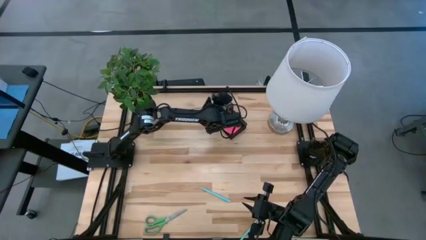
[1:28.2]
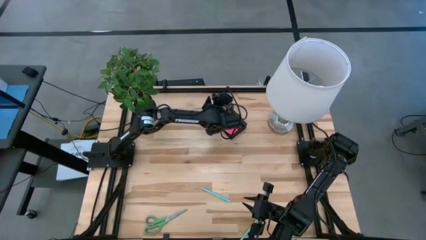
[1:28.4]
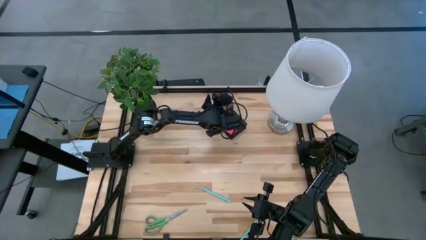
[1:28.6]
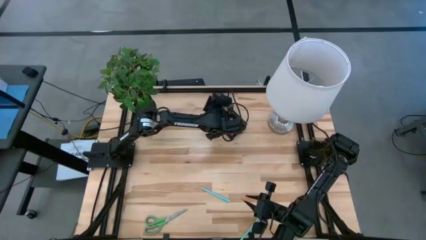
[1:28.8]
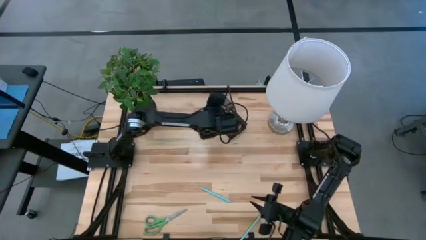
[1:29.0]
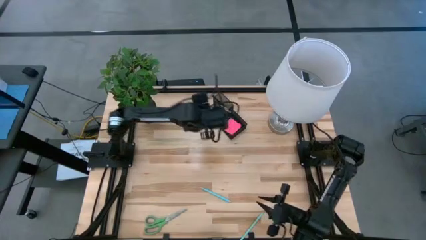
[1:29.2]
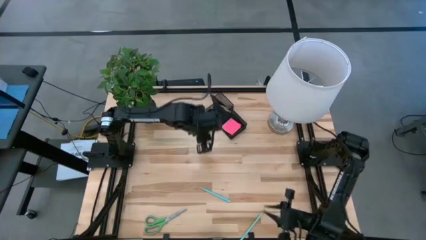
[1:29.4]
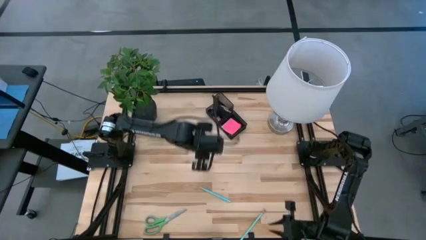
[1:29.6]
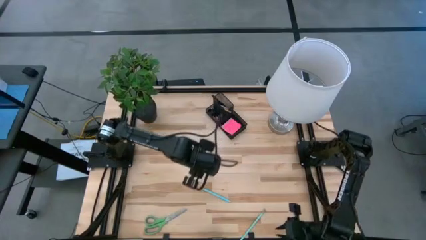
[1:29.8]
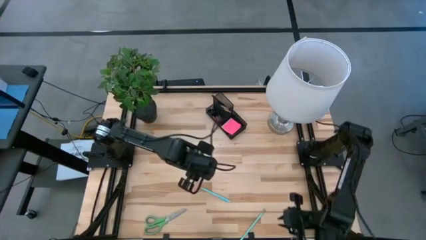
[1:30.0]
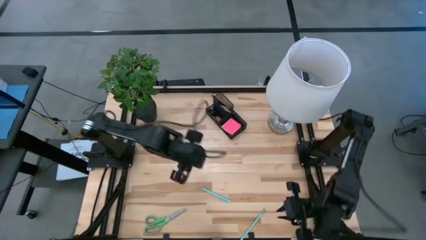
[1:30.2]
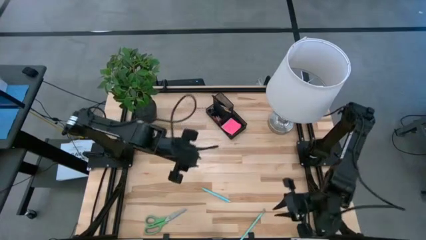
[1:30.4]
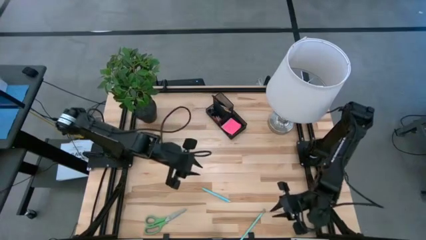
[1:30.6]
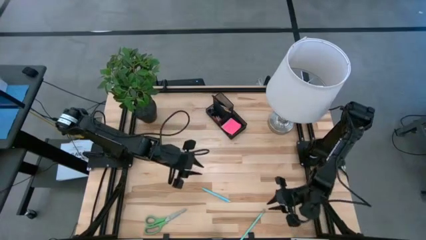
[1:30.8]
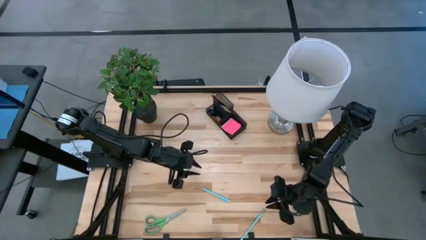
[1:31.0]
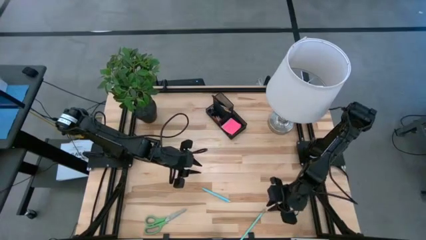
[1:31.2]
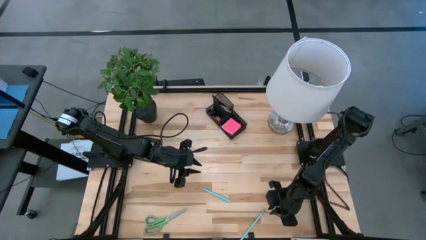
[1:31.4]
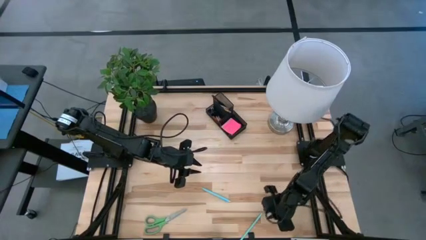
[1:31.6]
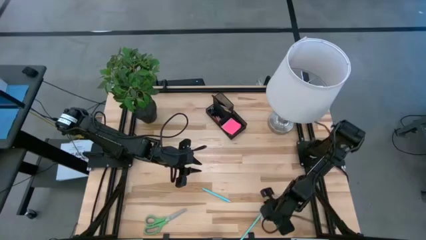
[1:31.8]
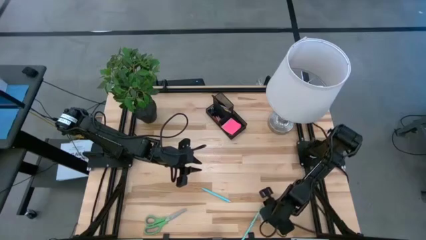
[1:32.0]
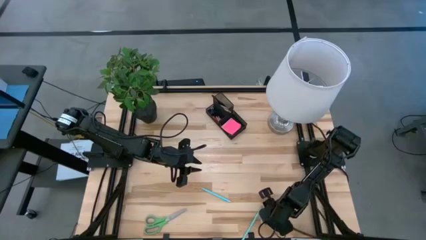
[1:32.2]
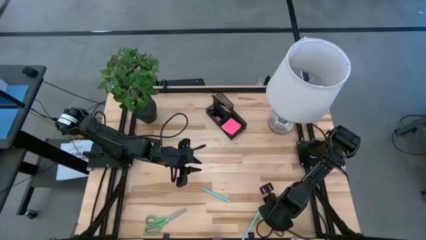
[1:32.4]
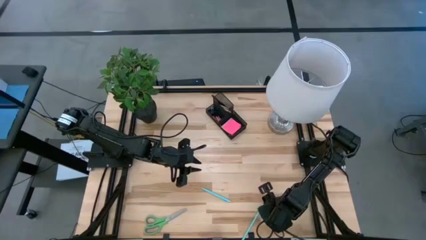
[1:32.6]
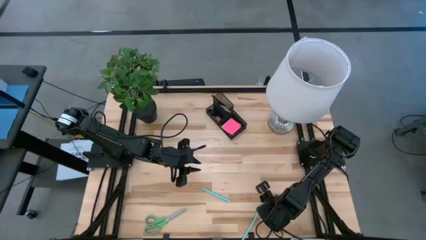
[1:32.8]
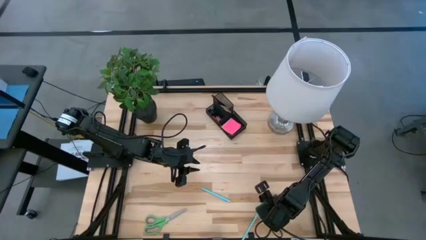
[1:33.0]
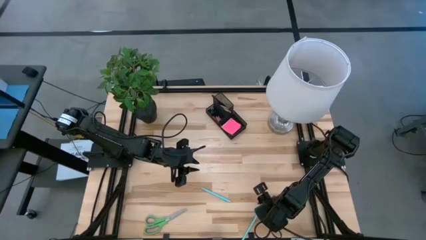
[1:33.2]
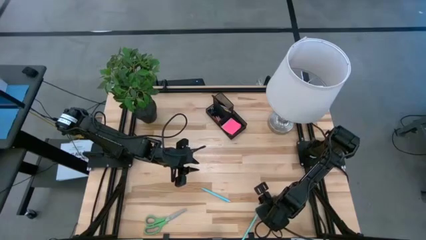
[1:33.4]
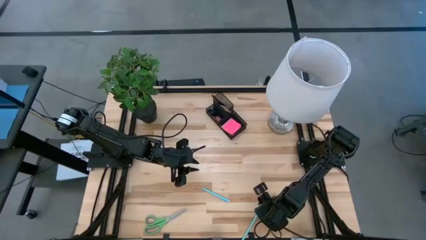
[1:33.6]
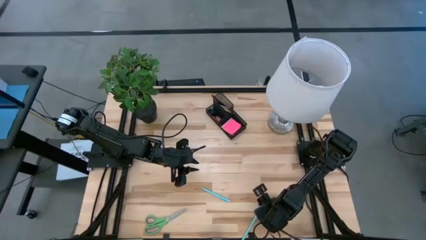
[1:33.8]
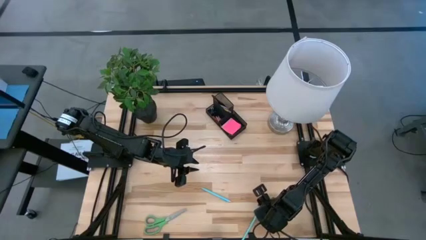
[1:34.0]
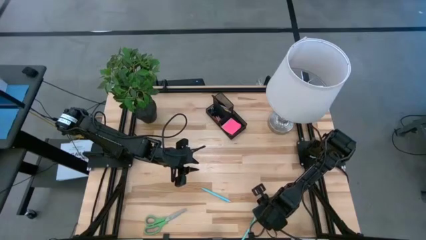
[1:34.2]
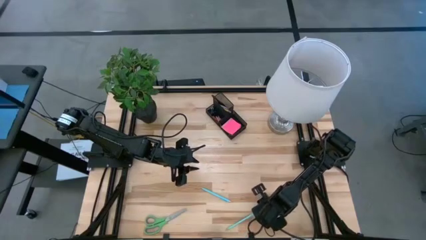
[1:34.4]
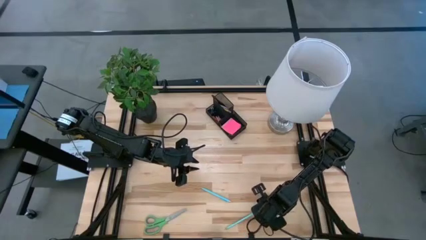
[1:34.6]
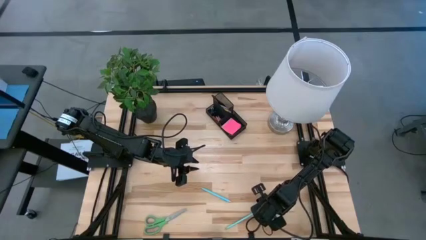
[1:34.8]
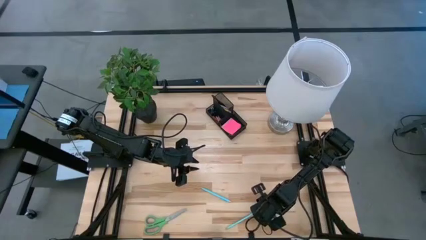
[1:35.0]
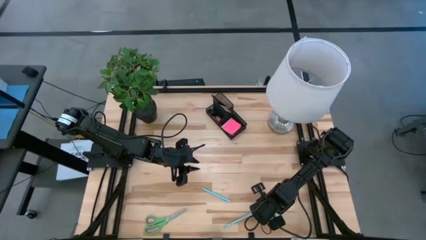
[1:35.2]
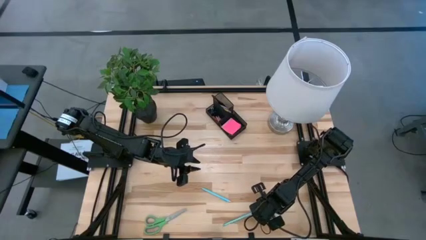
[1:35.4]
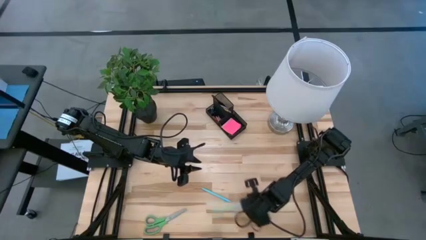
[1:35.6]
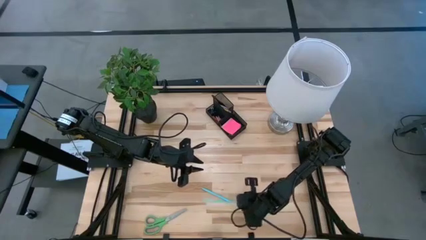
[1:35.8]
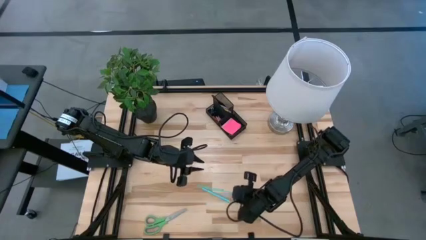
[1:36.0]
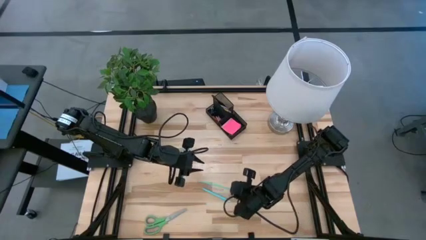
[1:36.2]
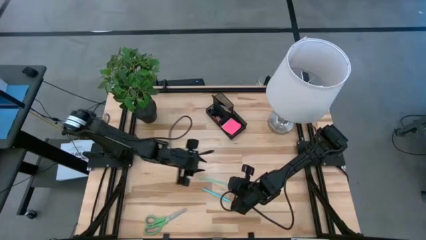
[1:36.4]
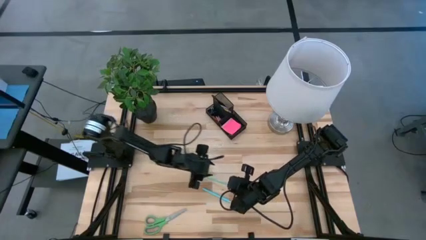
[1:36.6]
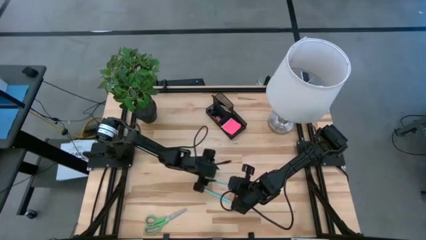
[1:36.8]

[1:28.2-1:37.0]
Task: Pick and place office supplies into organizer
Put the blue pencil into the desk organizer

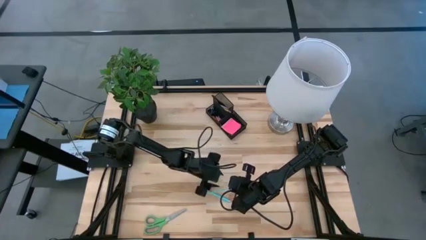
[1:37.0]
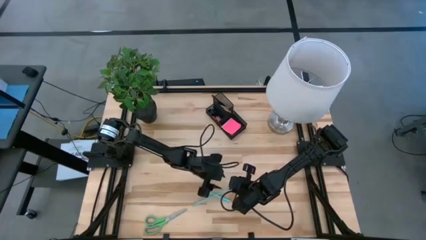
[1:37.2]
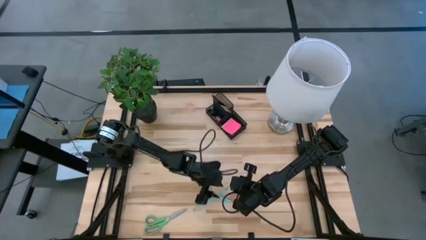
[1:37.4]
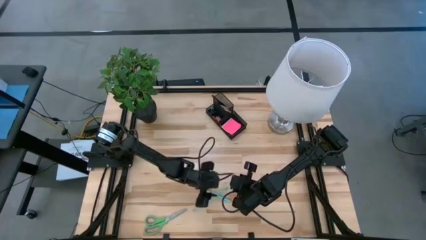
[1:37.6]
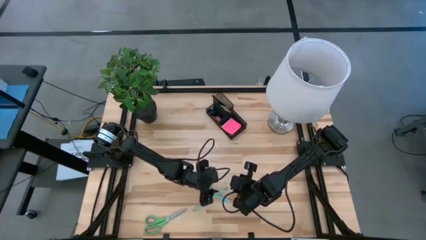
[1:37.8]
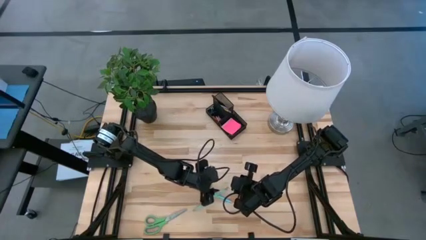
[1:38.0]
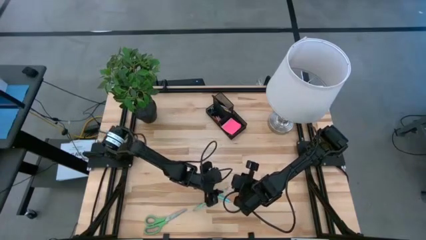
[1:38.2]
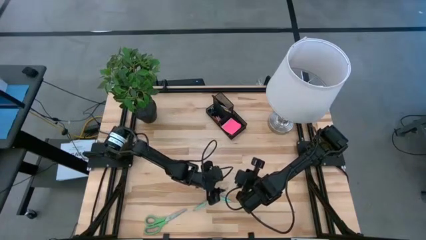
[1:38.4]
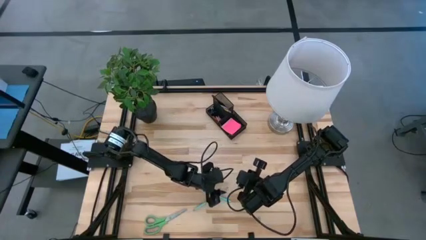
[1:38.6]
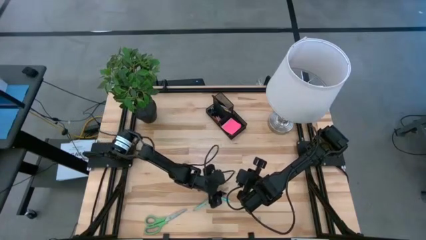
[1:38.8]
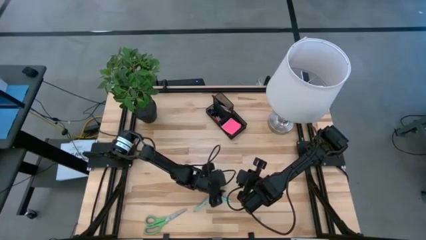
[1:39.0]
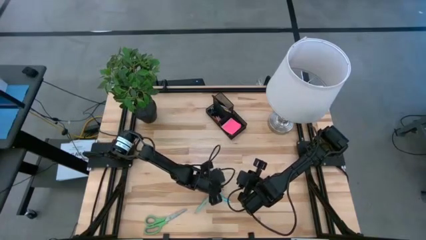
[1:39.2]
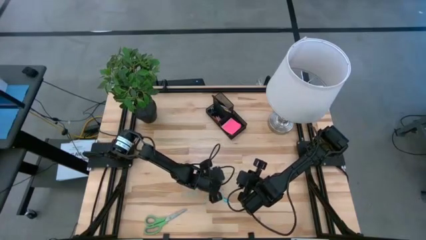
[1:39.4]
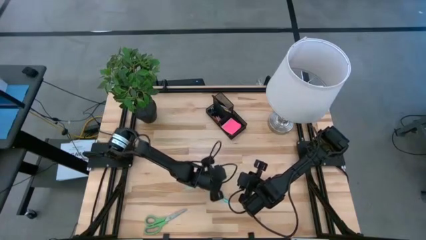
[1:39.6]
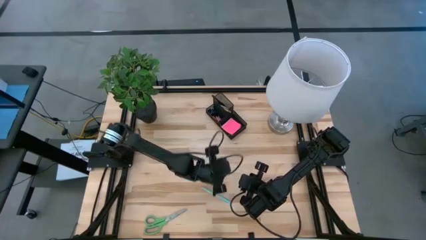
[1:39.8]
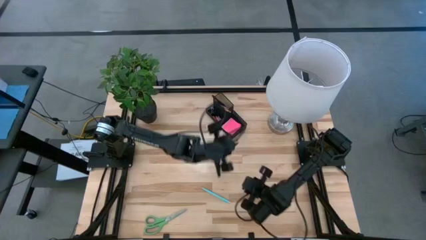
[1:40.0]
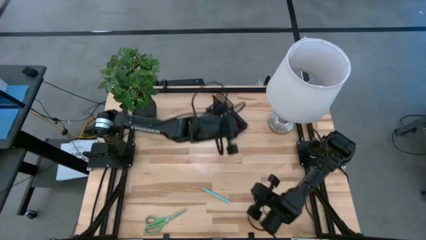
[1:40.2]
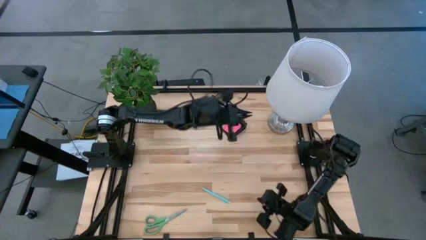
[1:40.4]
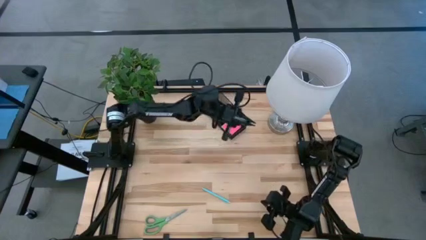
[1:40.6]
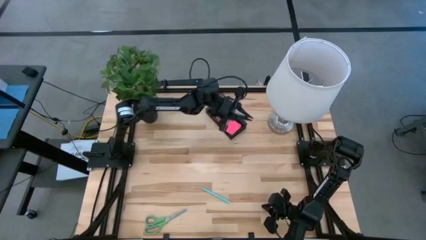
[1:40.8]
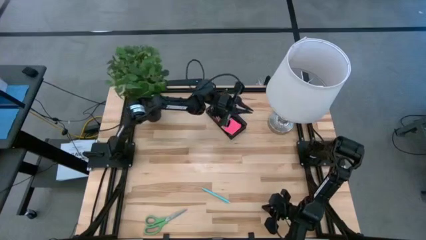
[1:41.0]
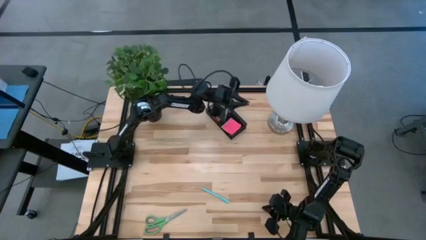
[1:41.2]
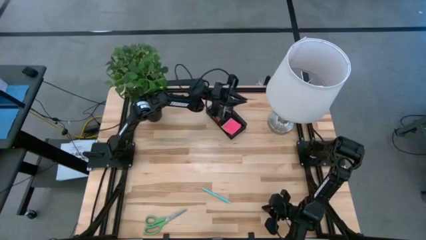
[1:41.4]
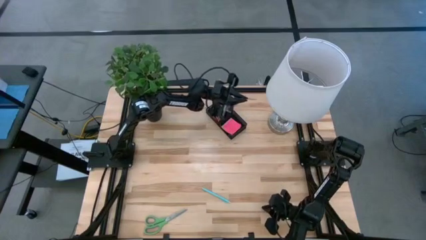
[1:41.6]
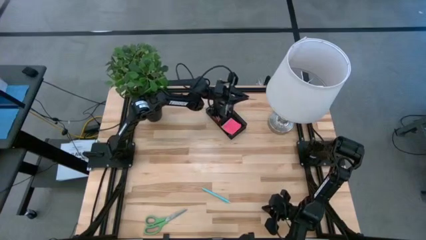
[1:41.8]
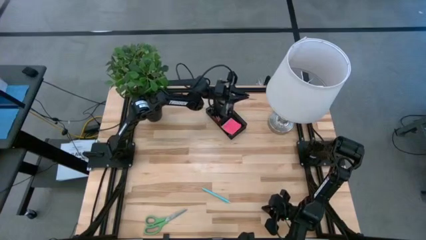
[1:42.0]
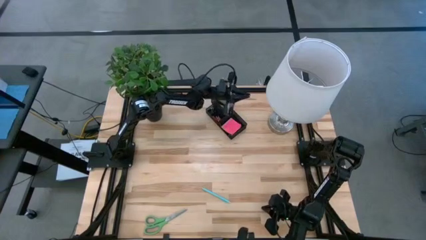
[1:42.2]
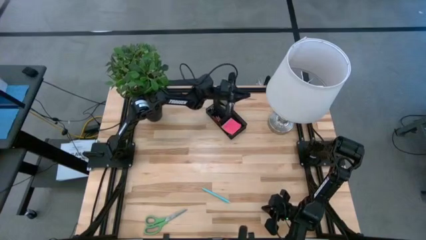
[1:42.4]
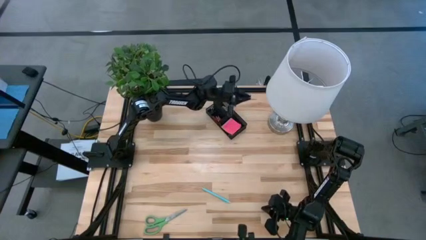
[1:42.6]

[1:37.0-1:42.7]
Put the blue pencil into the desk organizer

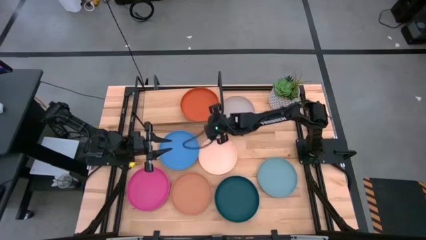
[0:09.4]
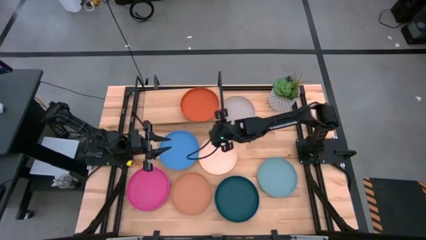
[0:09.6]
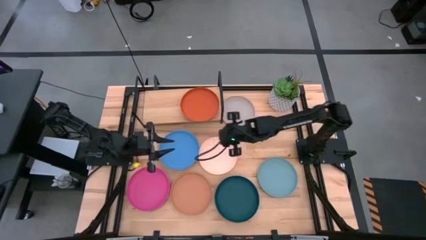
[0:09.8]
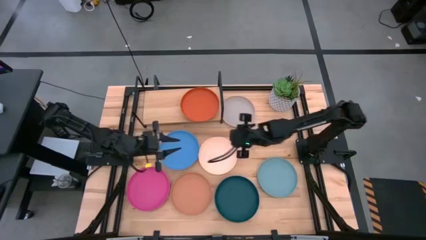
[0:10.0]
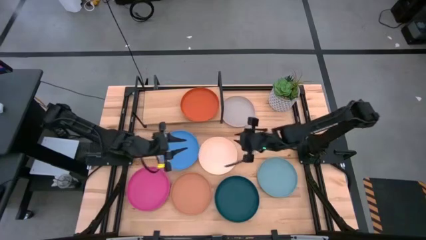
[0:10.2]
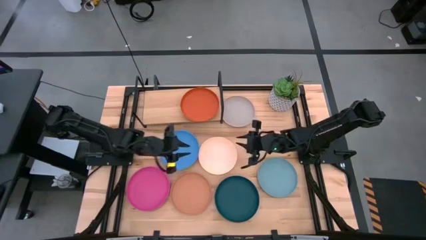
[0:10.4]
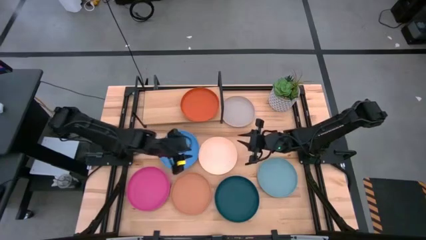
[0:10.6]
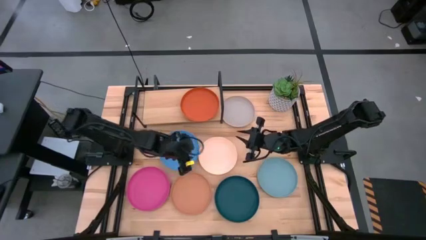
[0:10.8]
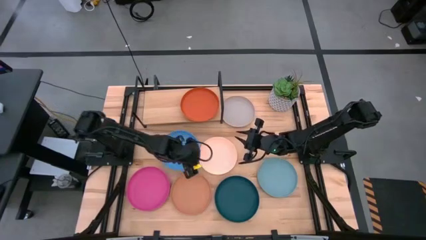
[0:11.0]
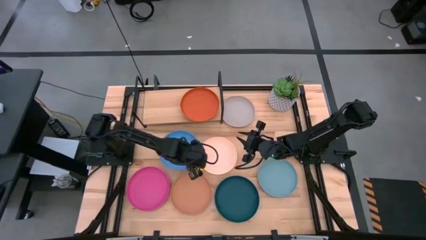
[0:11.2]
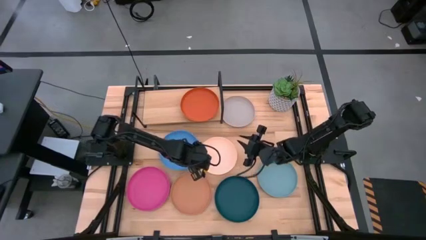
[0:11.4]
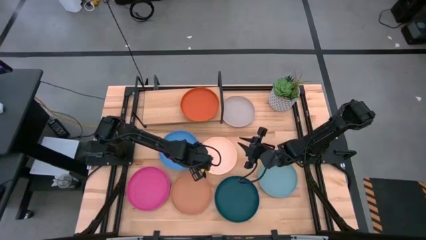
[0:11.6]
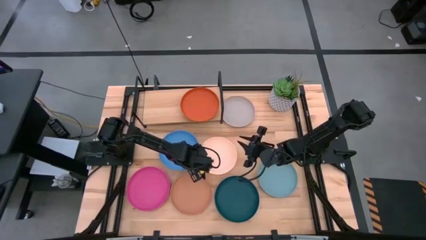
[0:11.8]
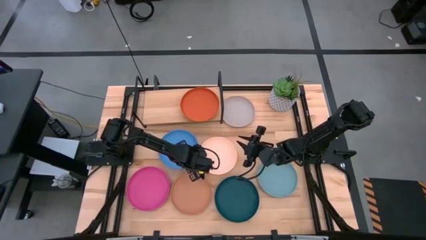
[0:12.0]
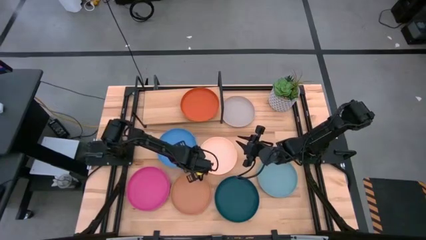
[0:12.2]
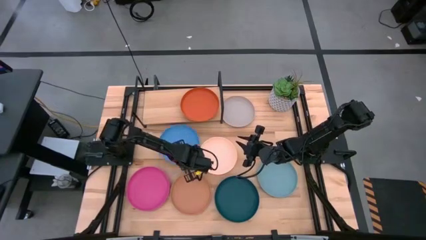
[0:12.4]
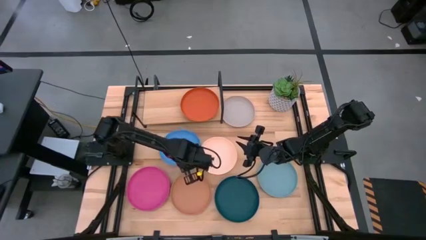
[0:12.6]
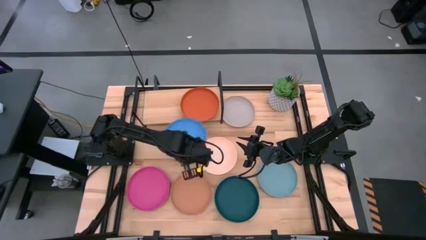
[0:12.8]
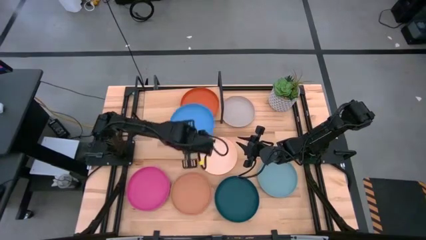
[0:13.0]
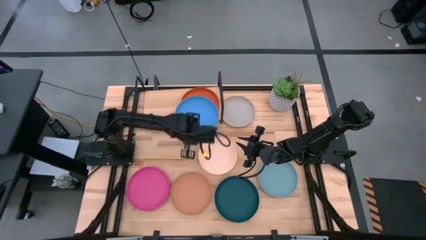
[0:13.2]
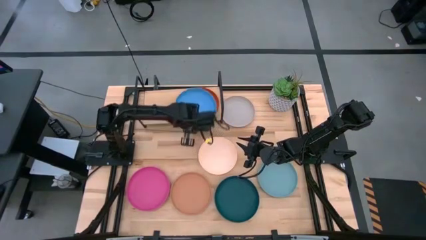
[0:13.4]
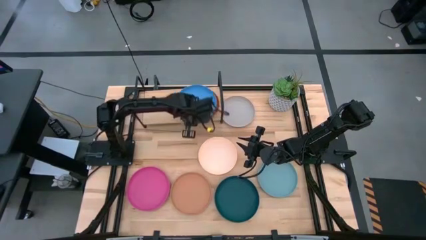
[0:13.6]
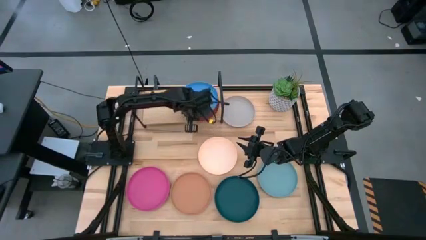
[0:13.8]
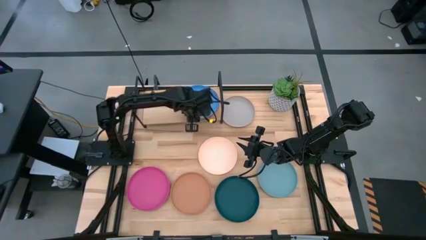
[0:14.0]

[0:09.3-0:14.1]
Task: Place and stack plates onto a shelf
Stack the blue plate on top of the orange plate
